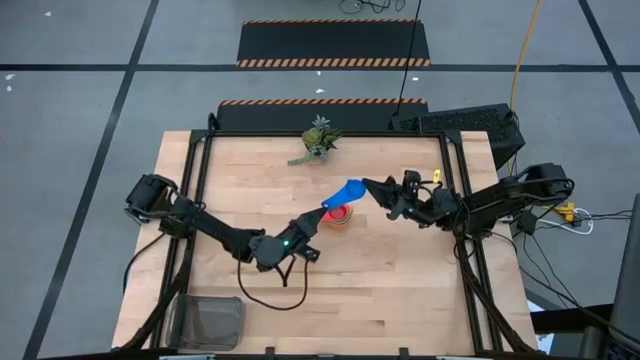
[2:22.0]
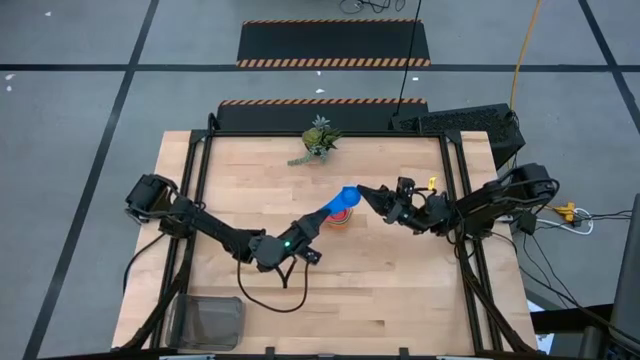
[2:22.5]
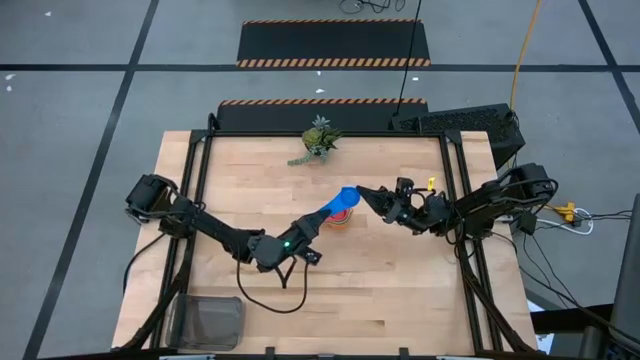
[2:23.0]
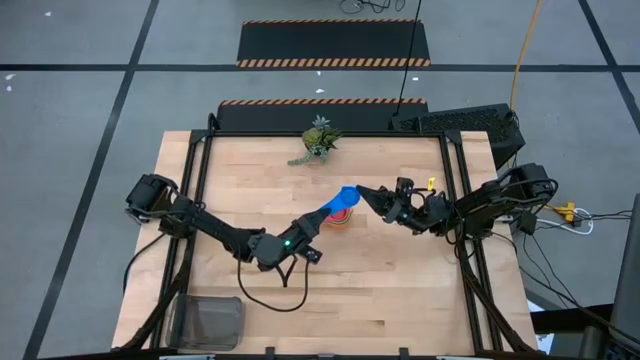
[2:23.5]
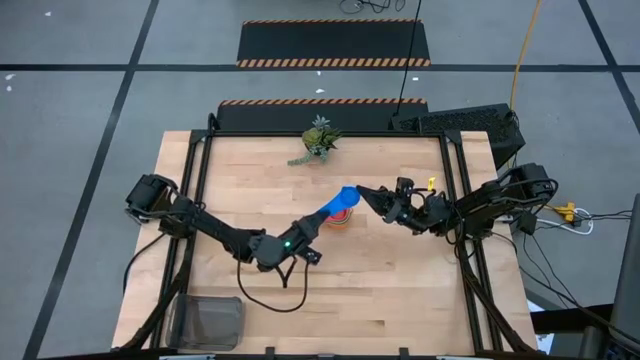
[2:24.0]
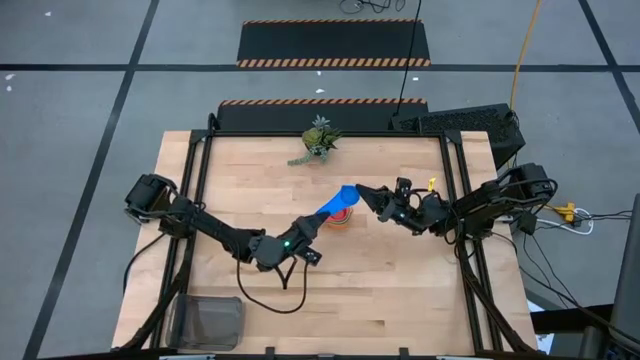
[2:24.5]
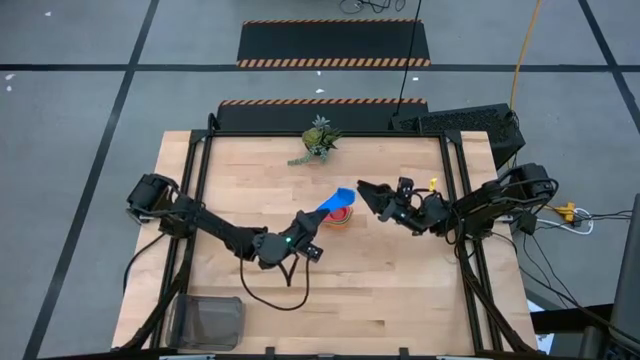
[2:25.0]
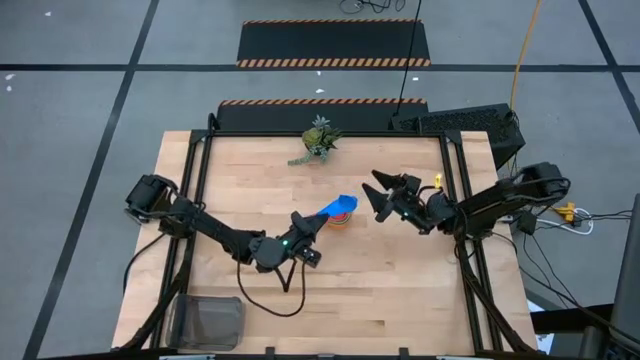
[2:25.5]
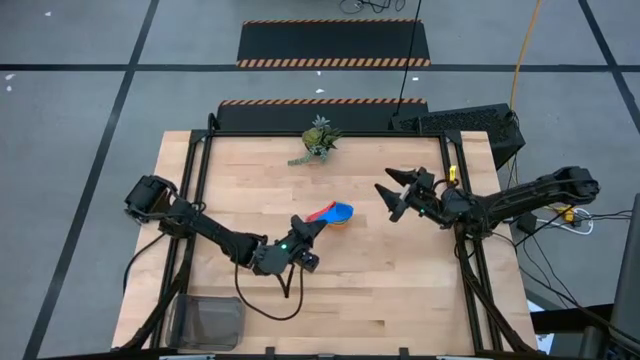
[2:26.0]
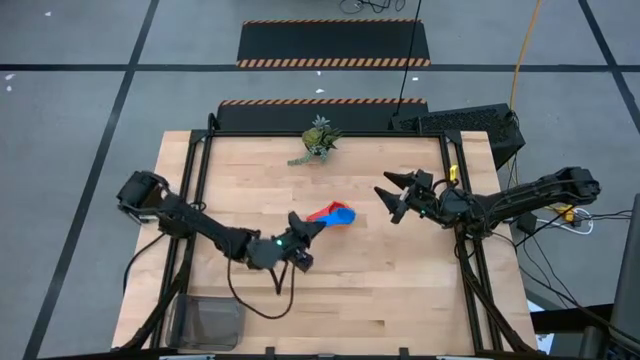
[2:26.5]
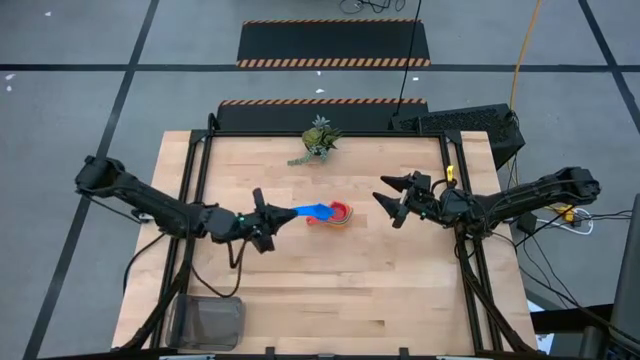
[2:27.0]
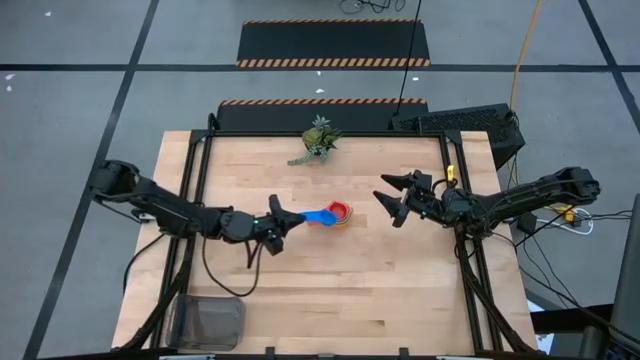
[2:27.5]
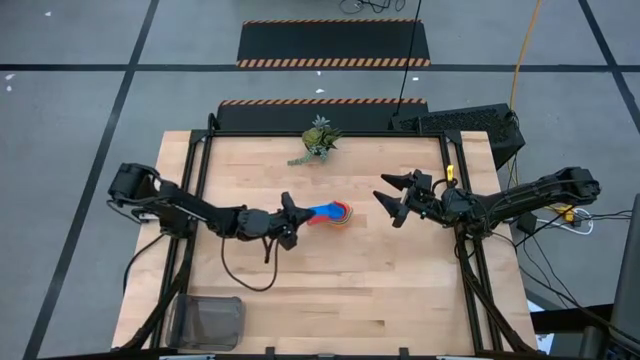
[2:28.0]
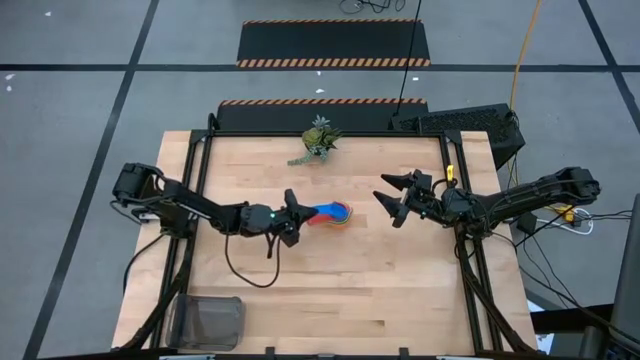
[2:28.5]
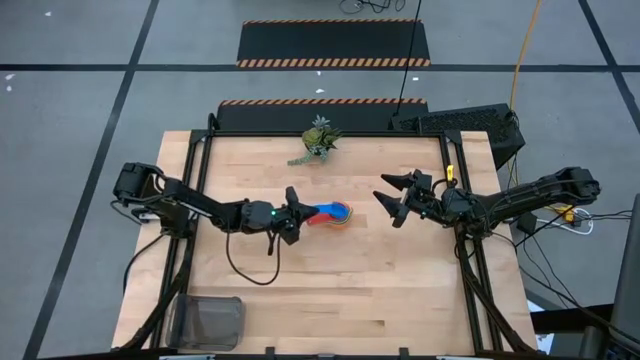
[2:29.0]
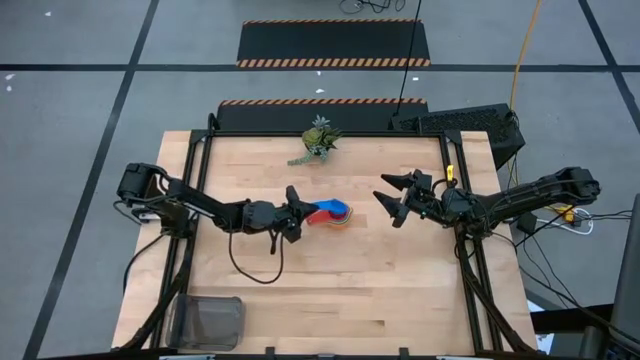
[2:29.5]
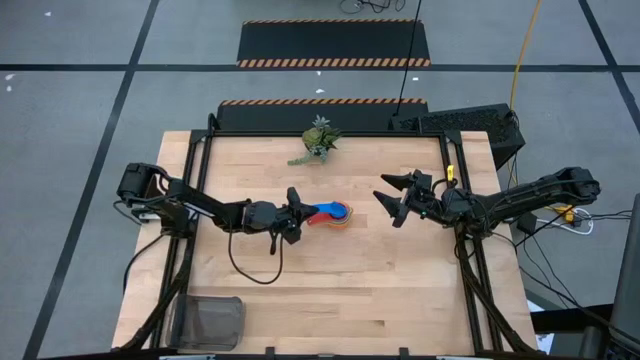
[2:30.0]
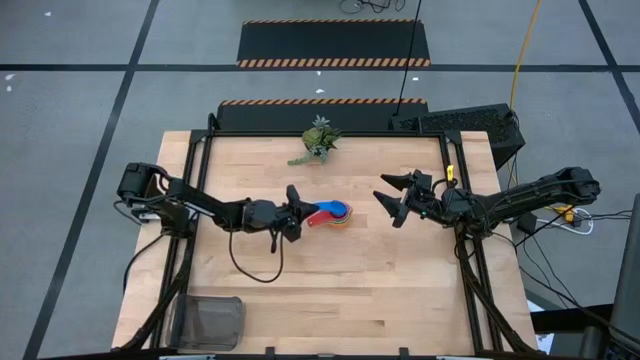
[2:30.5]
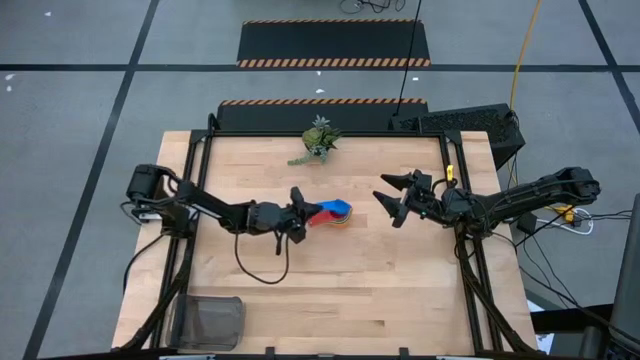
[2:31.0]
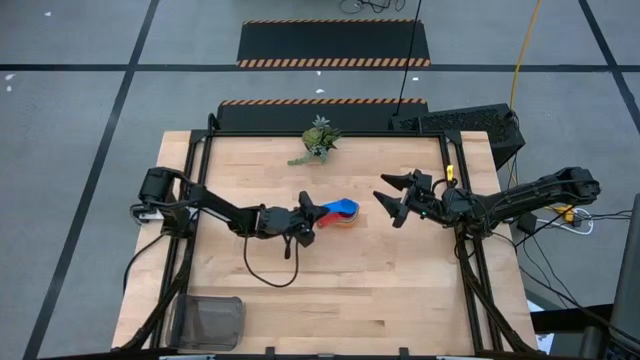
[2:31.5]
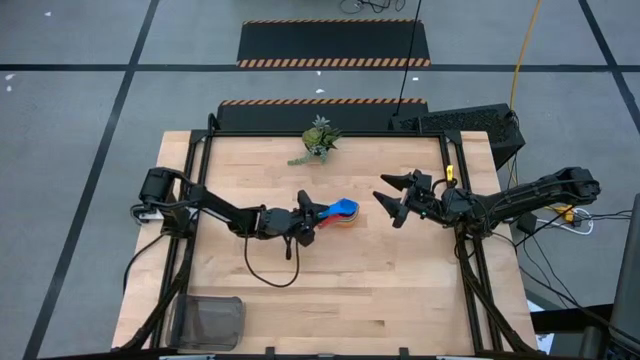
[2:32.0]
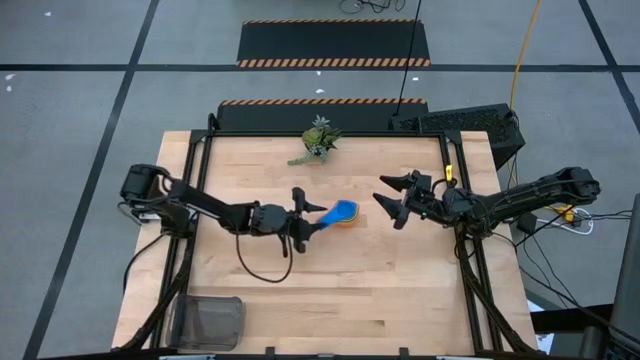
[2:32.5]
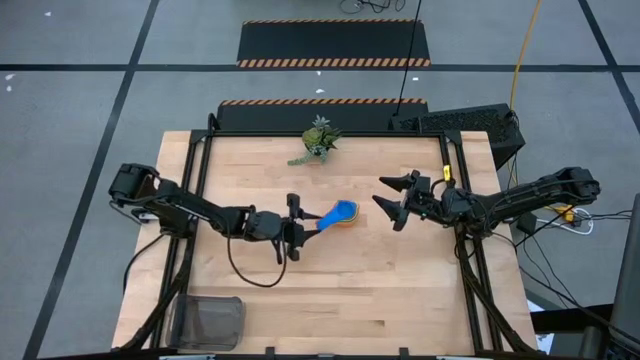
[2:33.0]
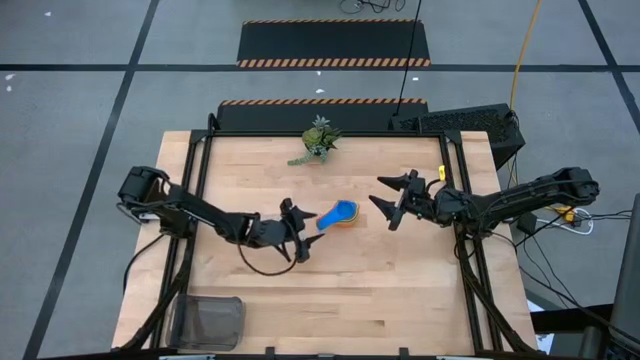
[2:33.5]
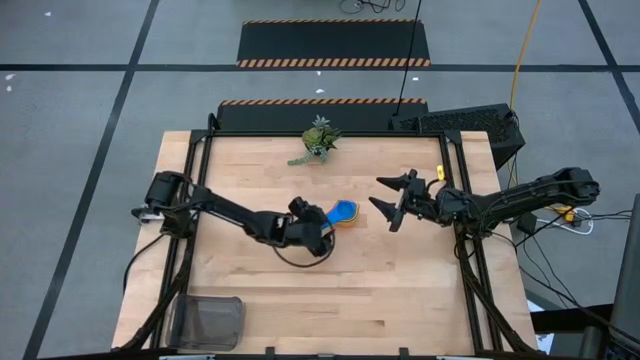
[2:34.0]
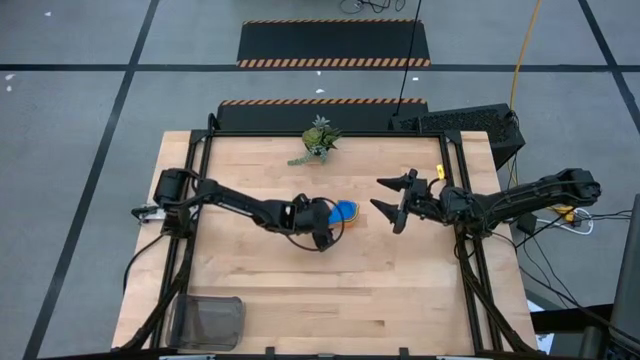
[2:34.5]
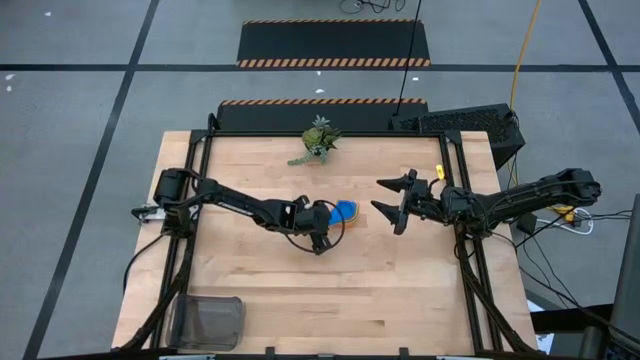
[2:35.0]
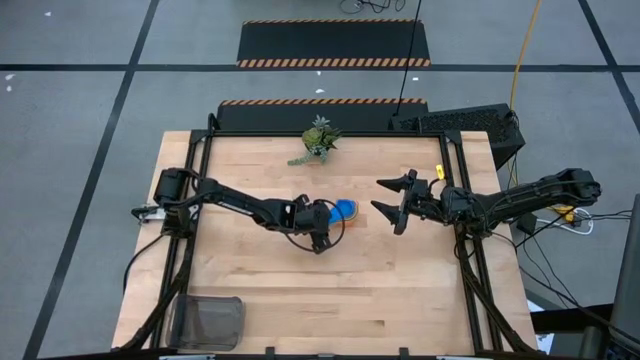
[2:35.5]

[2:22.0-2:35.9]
Task: Nest measuring cups in basket
Stack the blue measuring cup on top of the red measuring cup

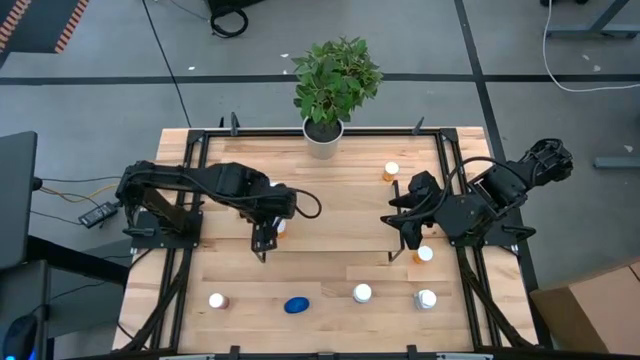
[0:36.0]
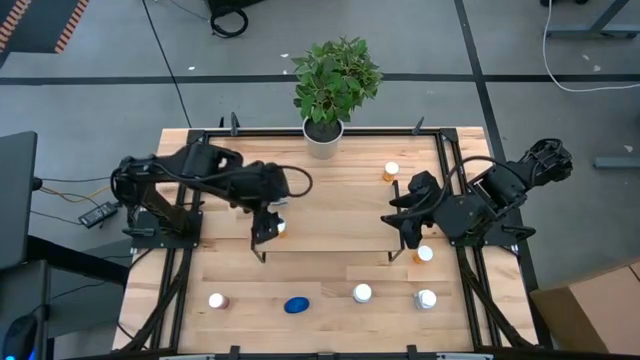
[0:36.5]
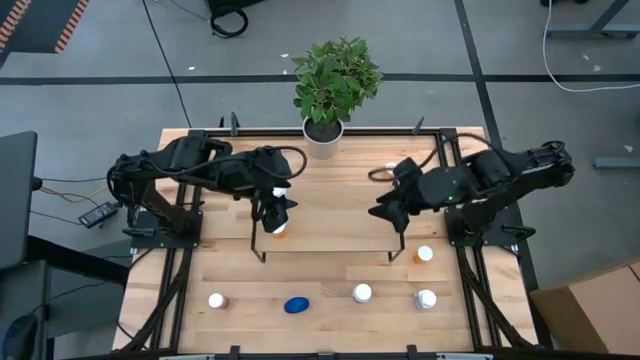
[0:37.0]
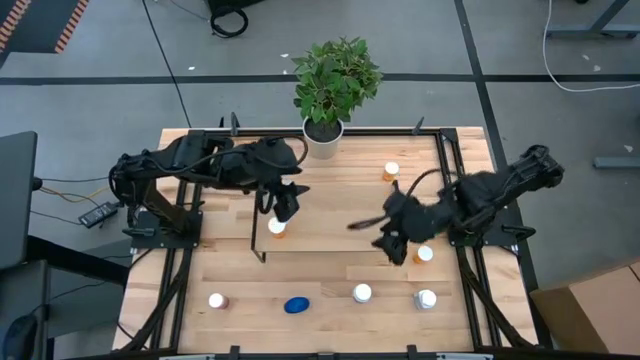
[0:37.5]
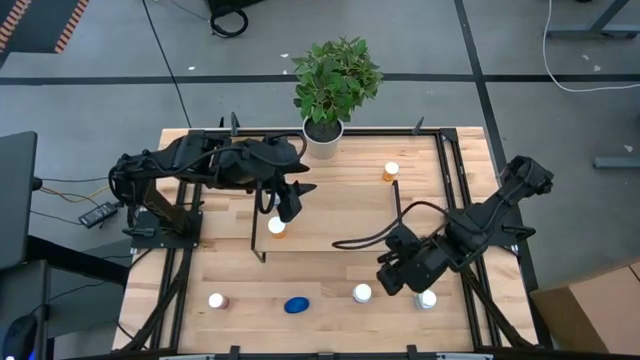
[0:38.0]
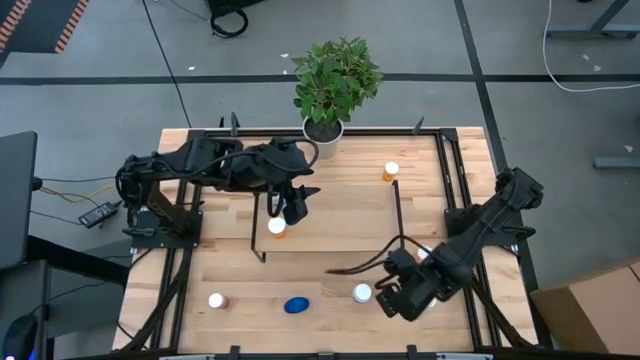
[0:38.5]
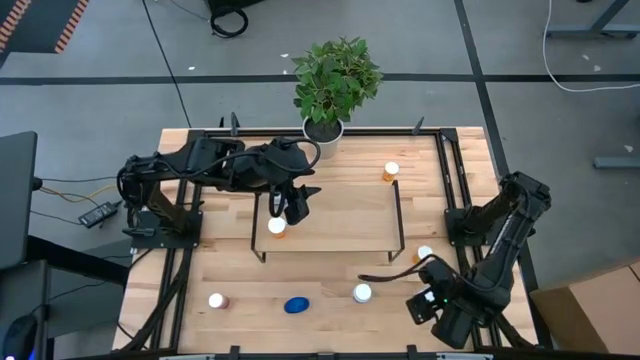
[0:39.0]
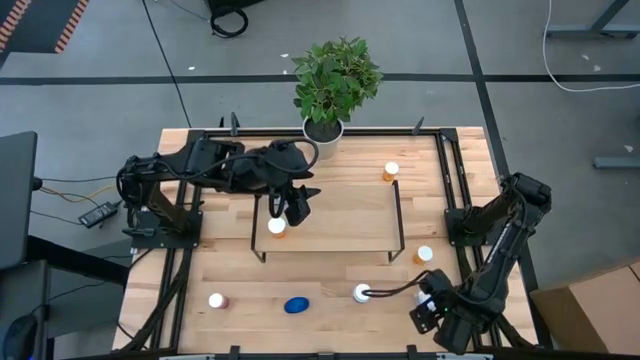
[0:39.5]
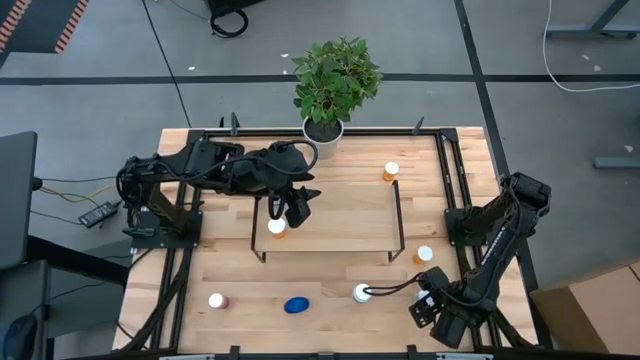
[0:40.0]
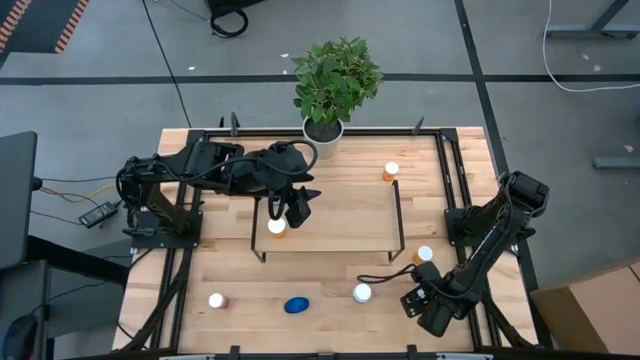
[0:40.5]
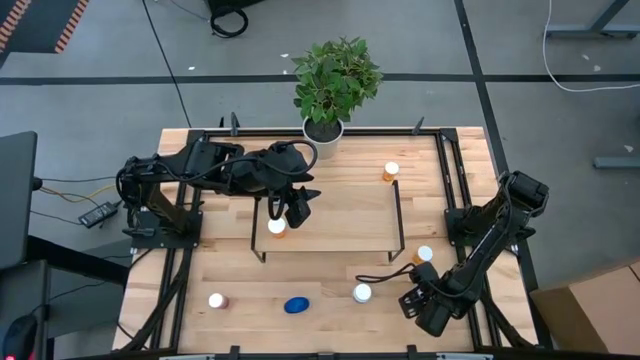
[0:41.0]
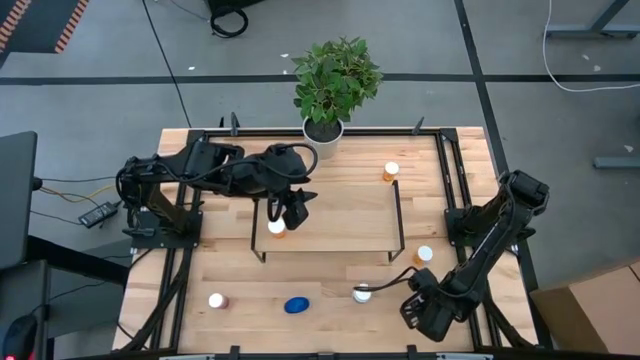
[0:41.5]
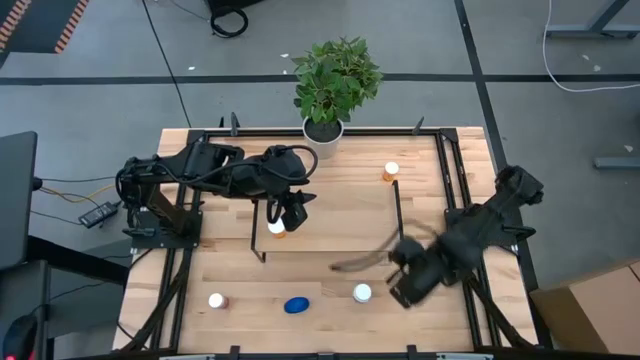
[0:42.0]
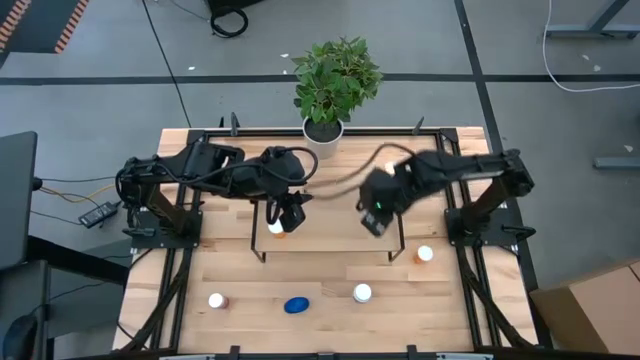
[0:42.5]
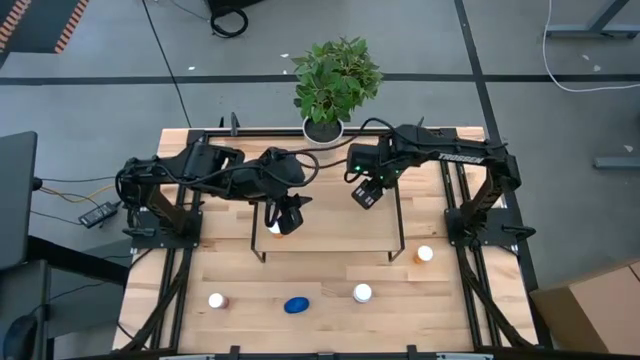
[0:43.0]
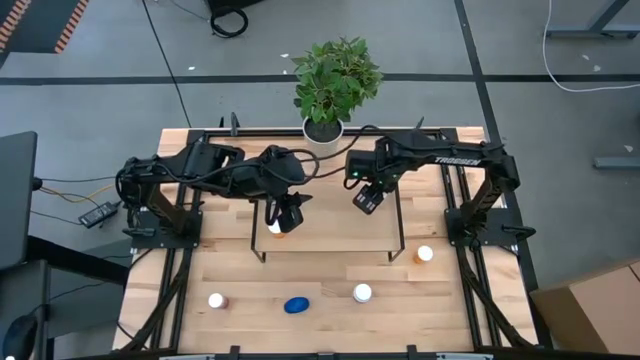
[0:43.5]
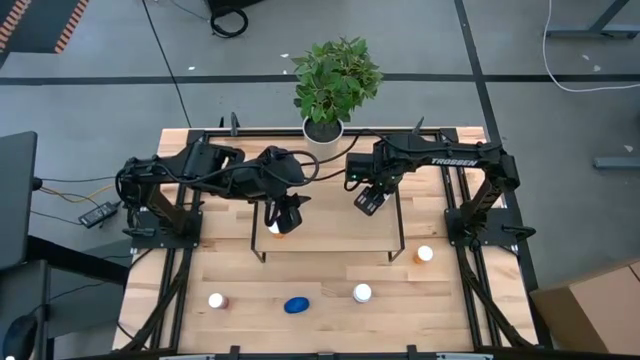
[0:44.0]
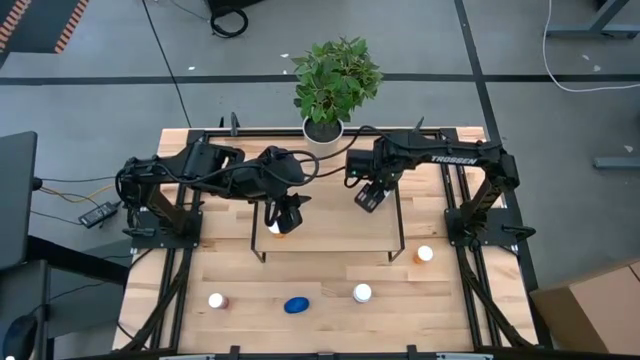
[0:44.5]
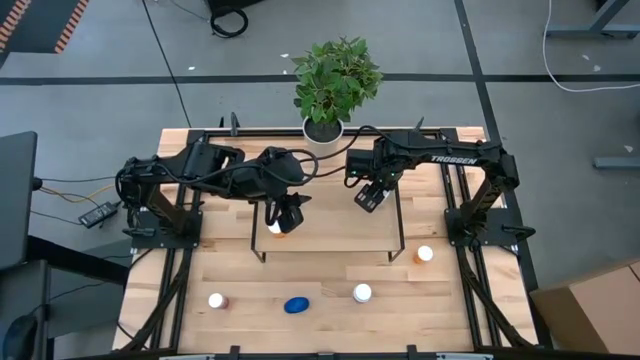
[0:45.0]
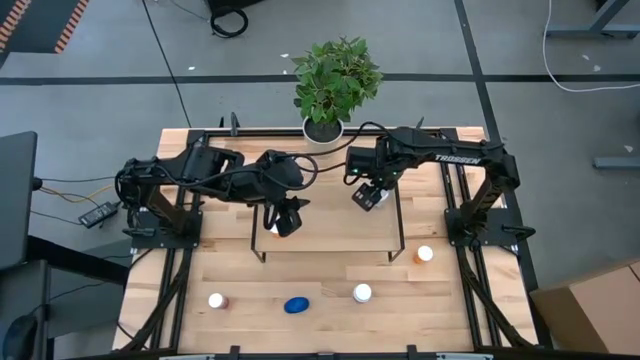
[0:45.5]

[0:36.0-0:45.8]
Task: Pick and place medicine bottles onto shelf by color
Put the white and blue pill bottle on the shelf
